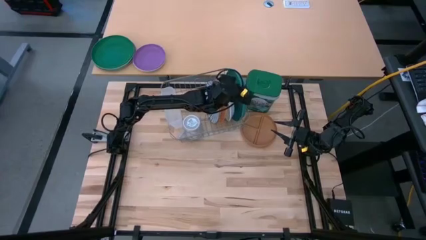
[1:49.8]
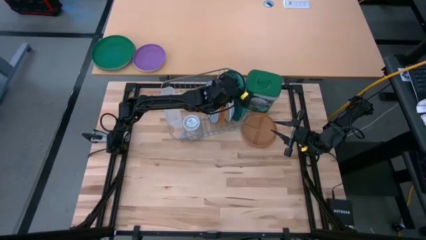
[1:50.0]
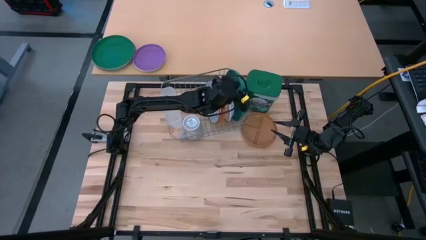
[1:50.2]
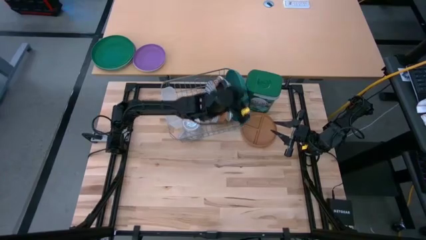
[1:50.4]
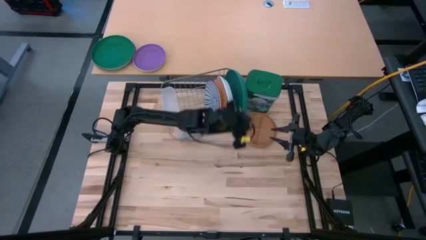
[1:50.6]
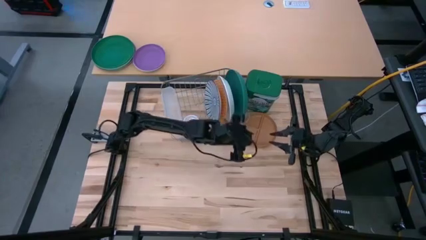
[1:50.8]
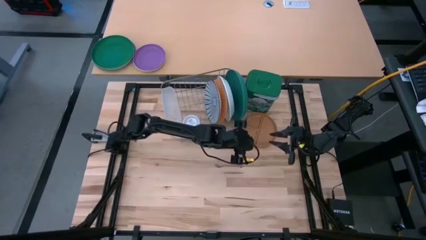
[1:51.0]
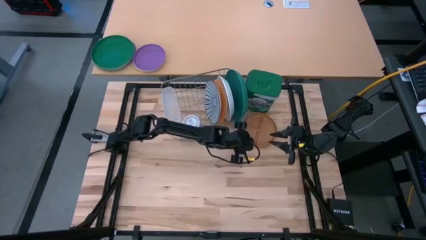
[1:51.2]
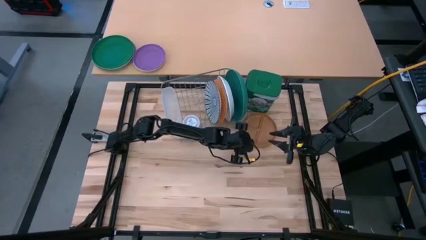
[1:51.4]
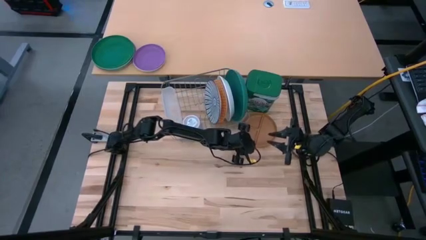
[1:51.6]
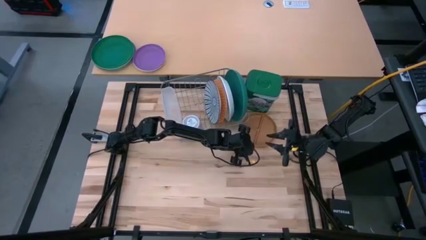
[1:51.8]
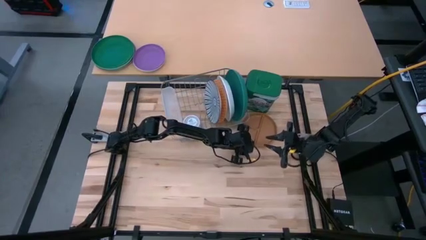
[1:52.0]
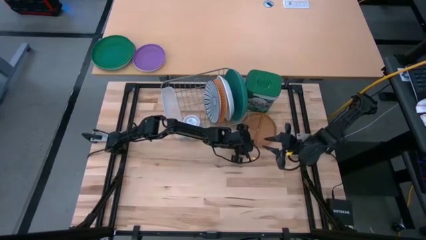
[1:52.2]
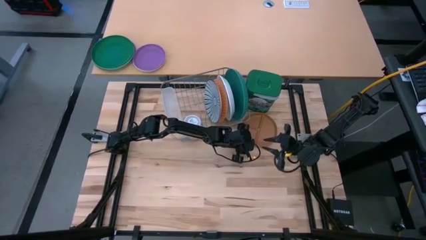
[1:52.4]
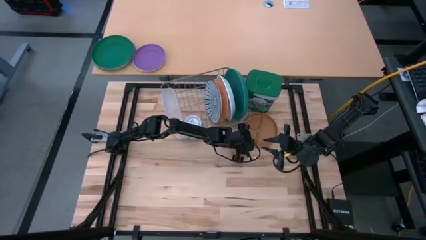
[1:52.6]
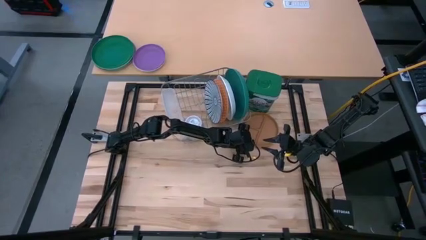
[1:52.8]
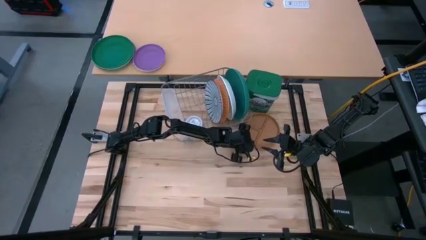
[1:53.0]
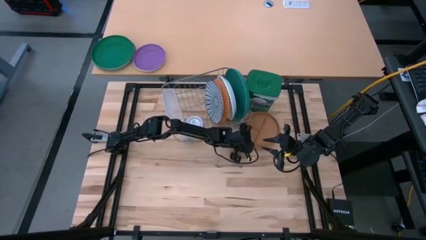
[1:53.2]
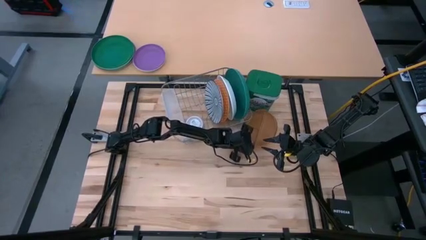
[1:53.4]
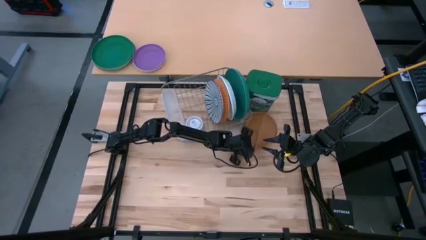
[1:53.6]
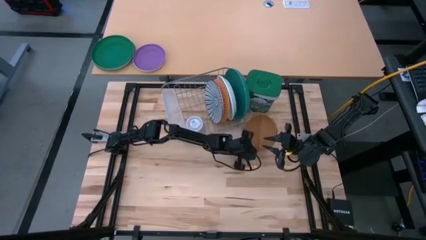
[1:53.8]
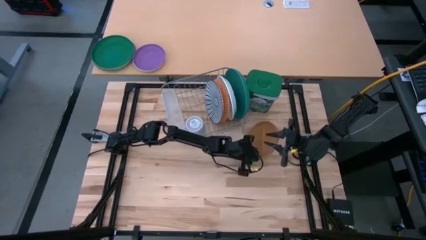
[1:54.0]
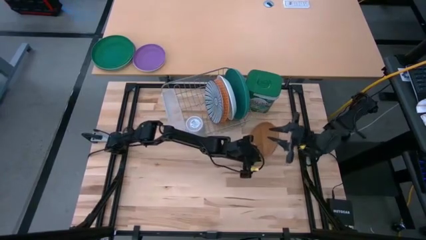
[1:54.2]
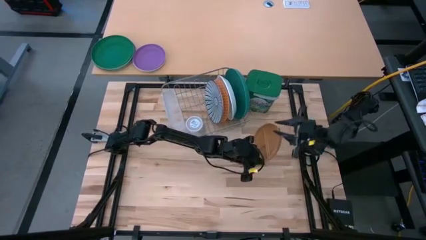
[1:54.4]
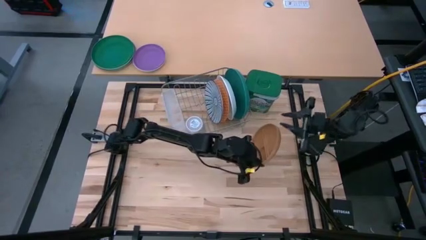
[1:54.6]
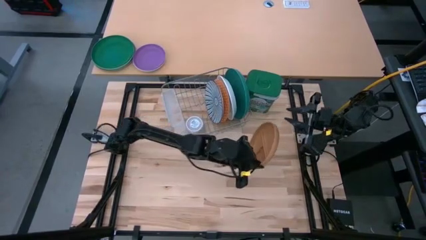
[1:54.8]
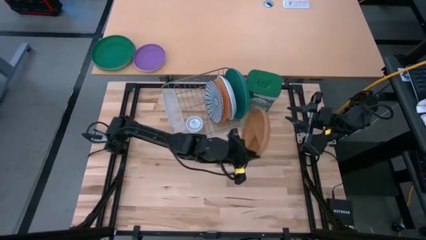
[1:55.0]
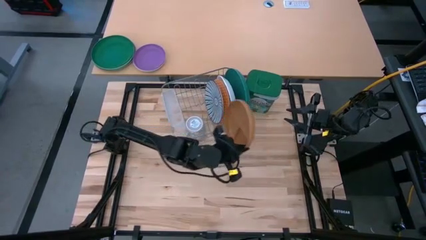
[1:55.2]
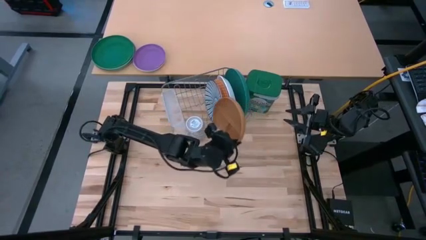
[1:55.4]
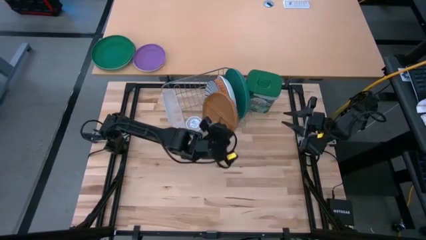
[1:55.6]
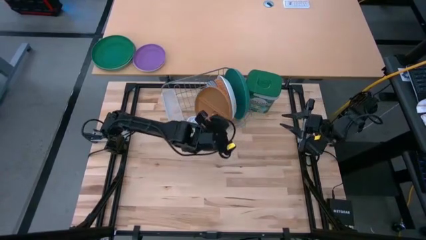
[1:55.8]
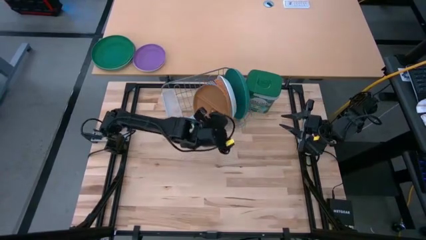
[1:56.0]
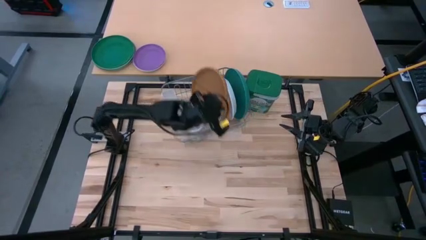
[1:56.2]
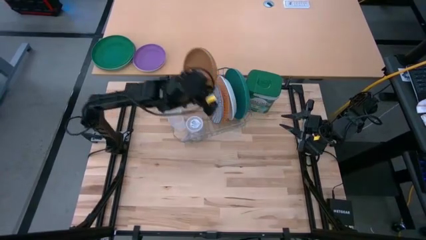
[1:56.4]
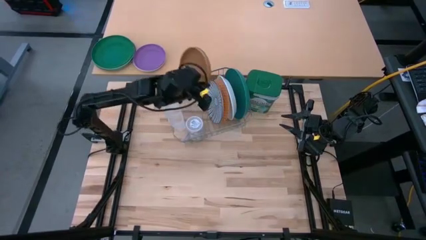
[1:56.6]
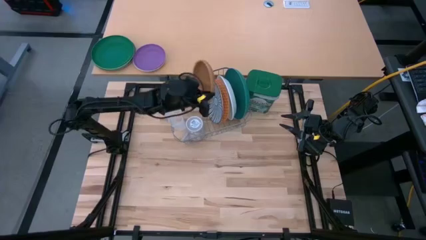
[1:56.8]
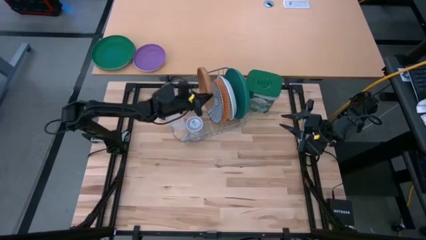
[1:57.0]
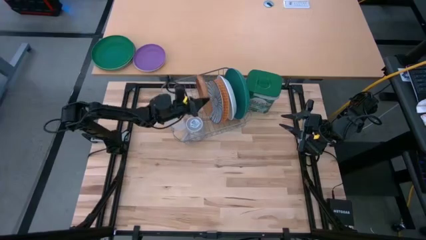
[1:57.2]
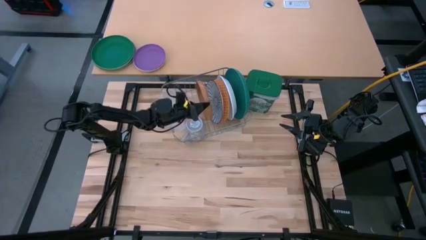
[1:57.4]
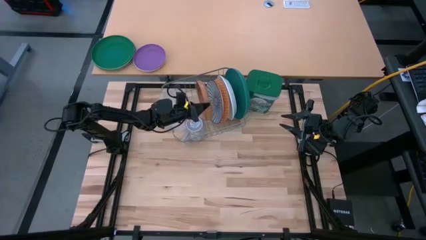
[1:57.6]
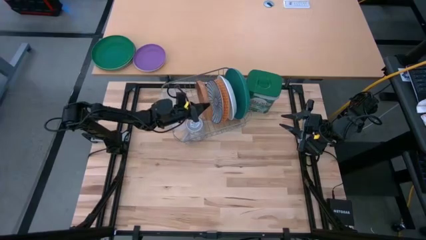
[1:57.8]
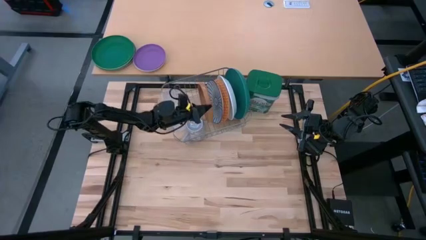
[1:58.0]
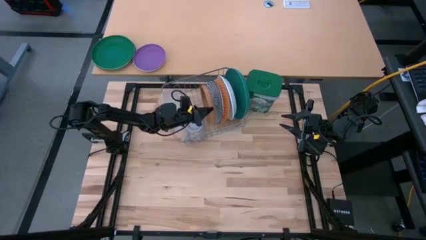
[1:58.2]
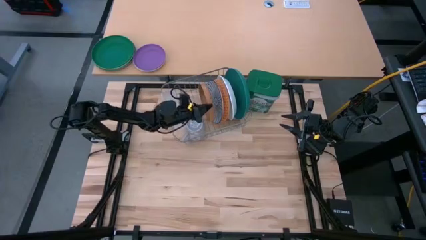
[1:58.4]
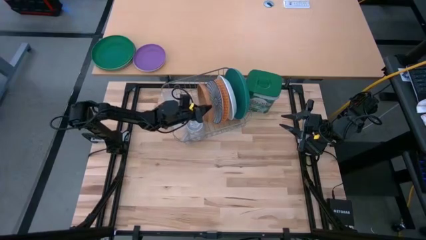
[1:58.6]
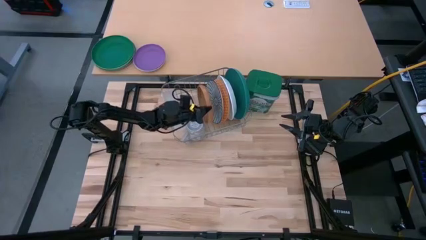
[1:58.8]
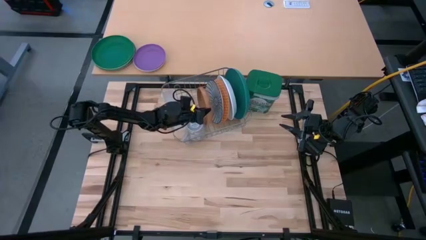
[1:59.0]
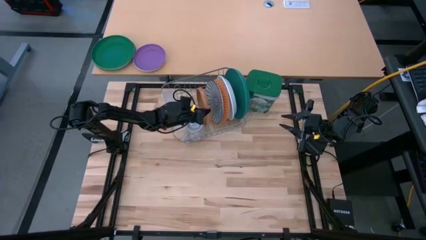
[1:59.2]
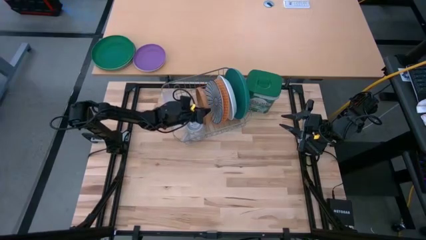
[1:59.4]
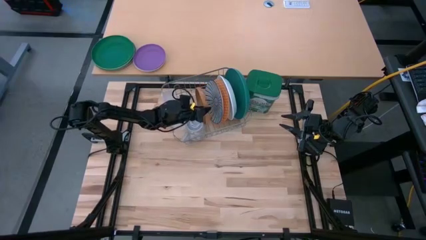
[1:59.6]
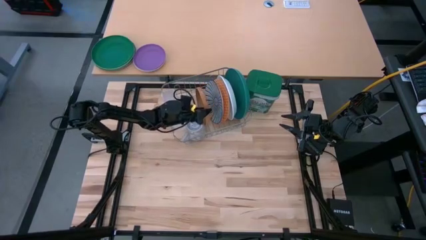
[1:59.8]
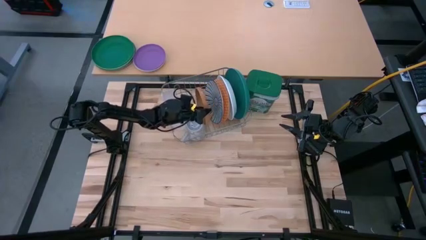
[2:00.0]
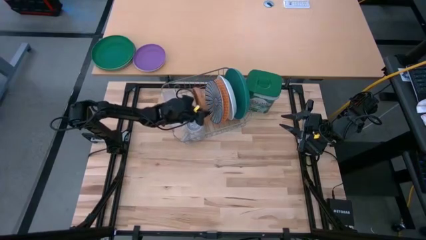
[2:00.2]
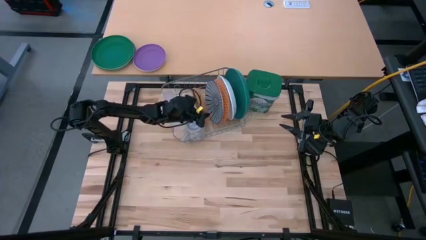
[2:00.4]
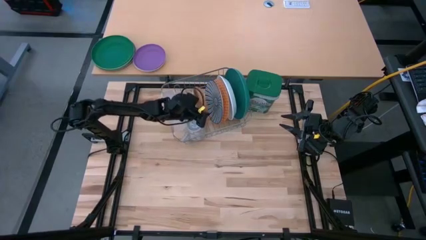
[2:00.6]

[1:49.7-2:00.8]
Task: Sort dishes
Put the brown plate in the dish rack

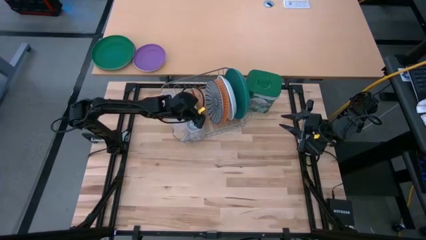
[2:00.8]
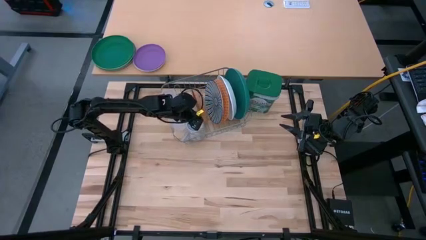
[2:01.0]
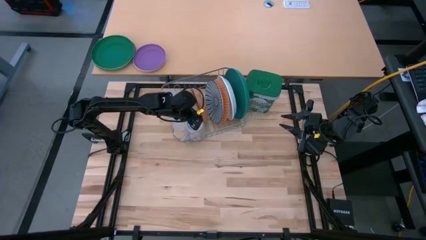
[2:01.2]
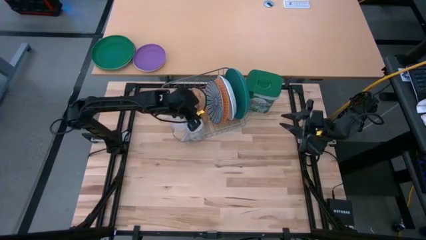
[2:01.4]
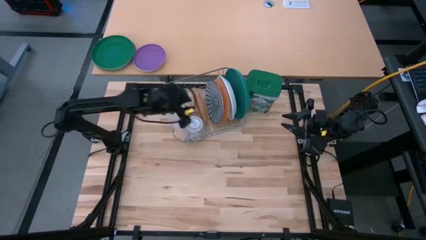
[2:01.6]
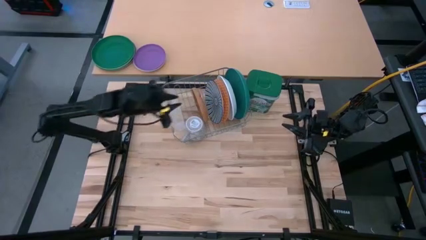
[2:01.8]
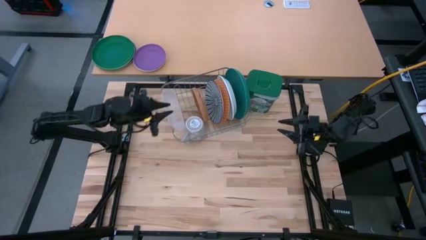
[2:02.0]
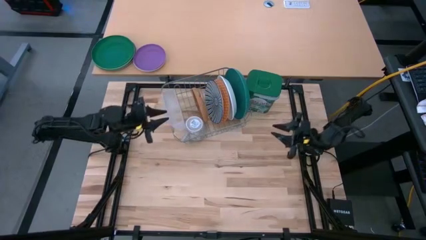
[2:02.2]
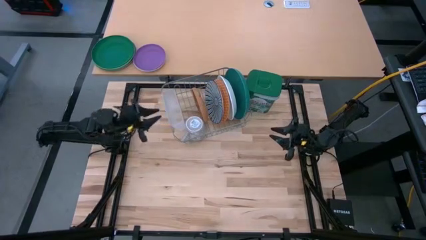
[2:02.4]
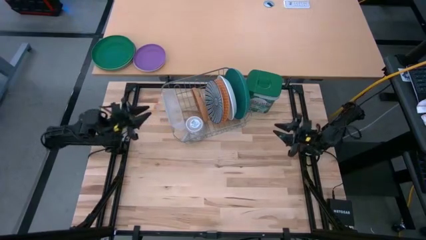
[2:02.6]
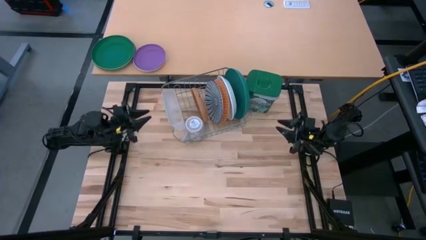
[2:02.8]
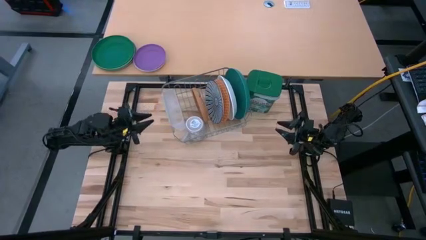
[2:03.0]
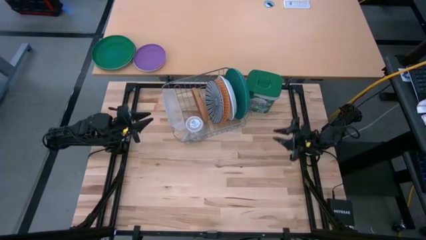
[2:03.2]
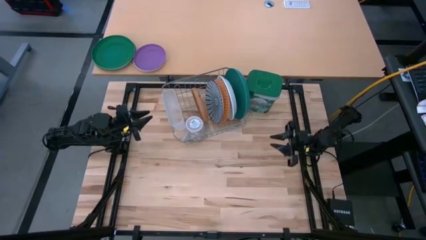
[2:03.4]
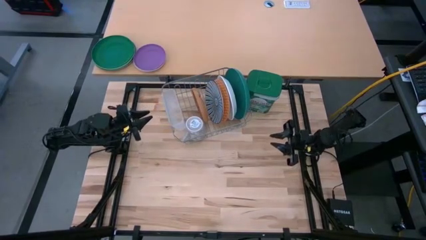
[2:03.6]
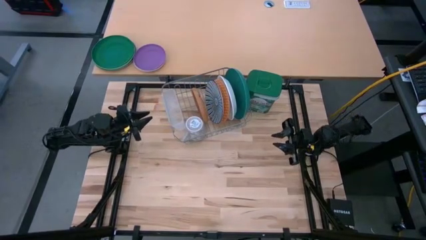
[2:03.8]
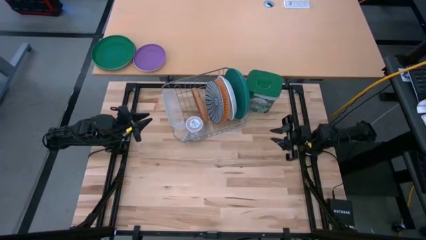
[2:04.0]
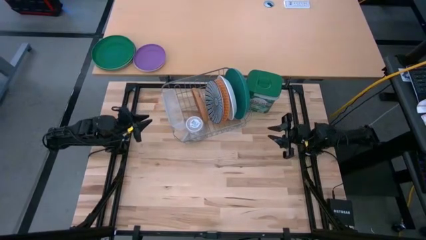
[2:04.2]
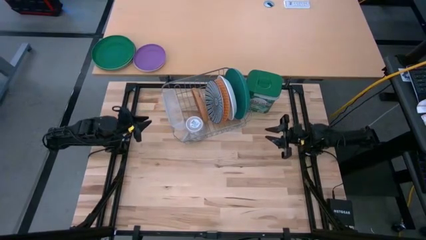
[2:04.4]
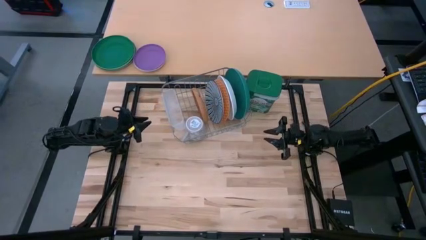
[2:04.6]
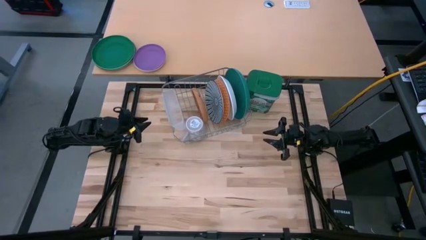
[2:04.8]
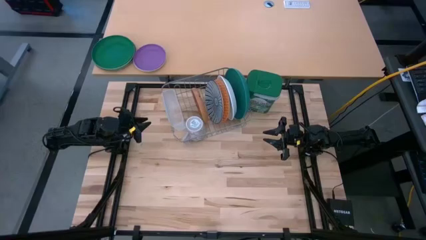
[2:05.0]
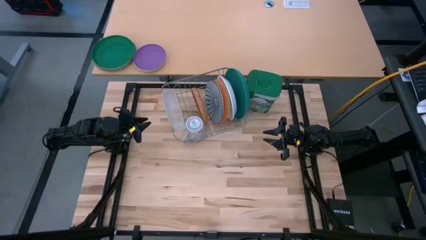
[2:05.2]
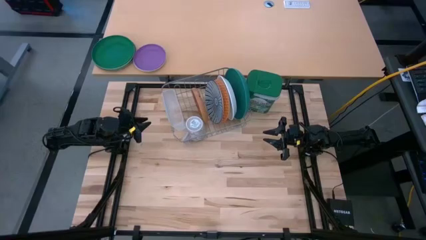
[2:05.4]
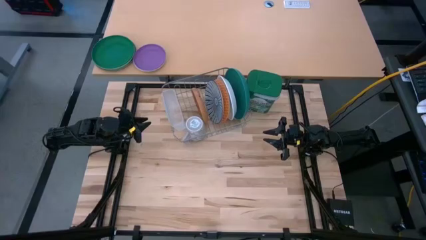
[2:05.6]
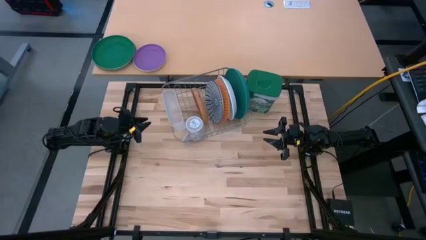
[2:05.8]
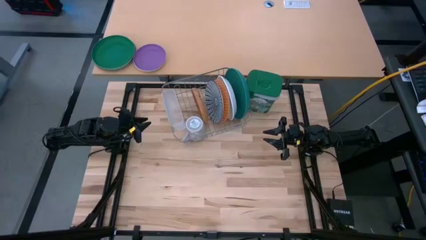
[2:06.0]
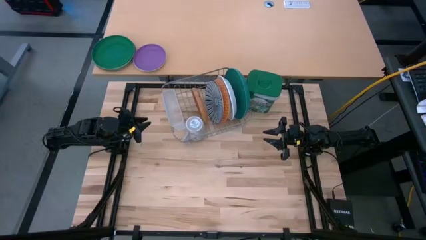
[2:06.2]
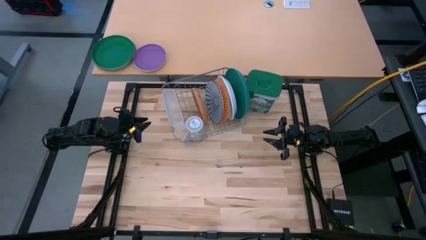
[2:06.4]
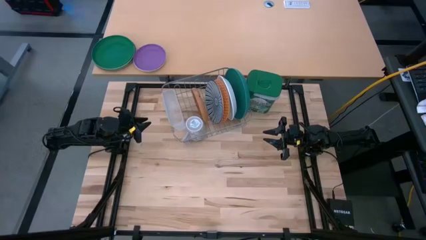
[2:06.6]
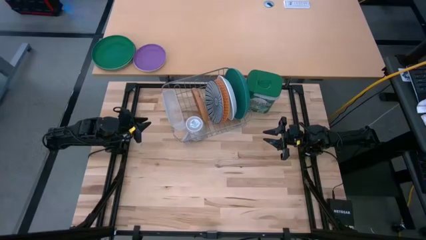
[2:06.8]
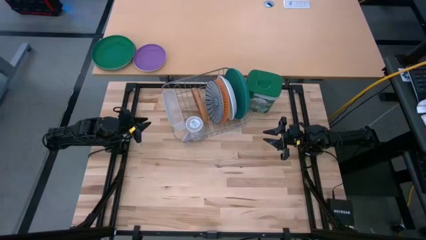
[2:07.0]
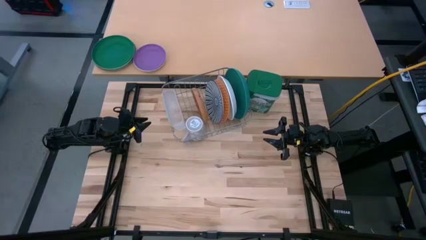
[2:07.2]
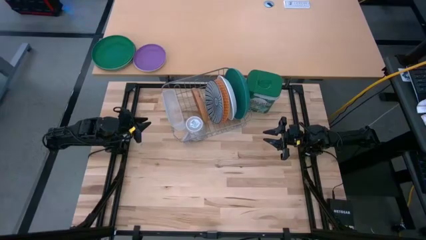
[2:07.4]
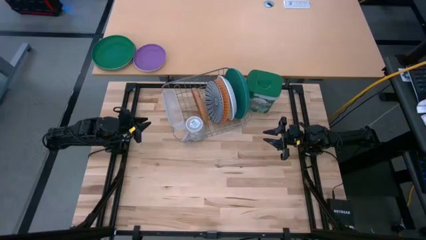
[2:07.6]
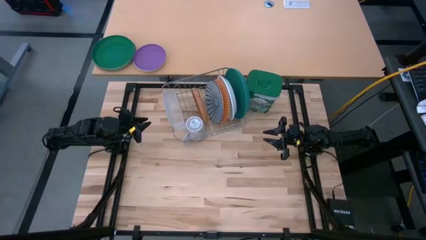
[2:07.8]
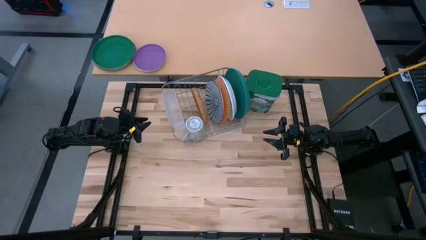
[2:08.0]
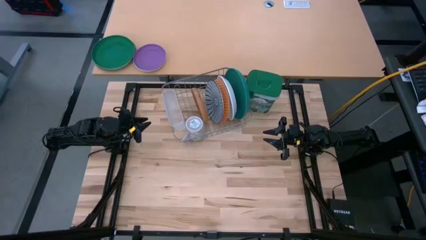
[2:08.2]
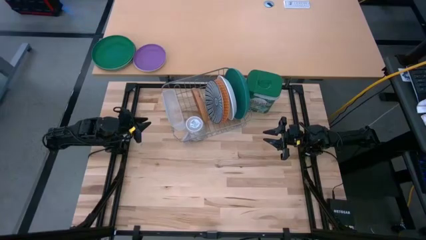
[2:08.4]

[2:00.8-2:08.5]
Return to Home Position
